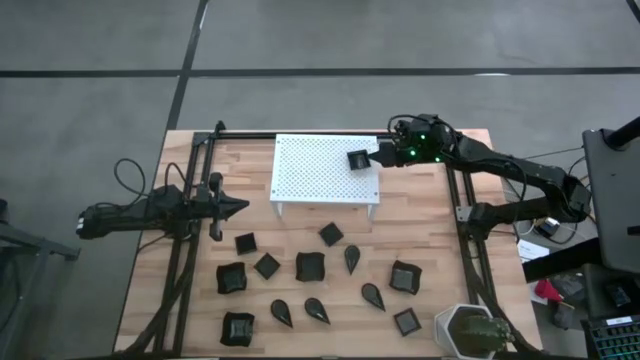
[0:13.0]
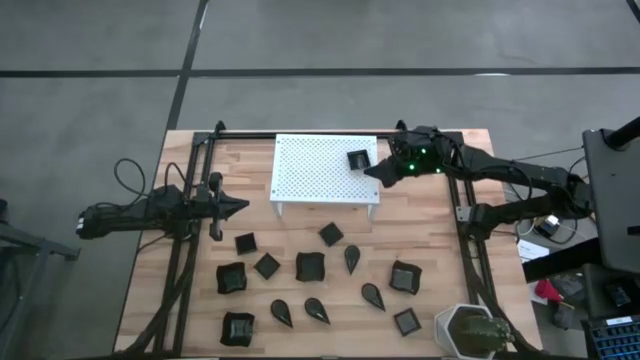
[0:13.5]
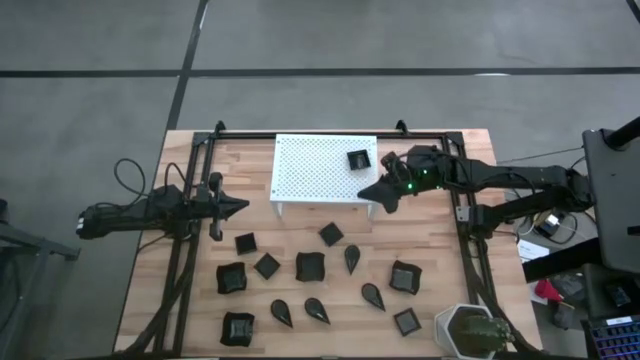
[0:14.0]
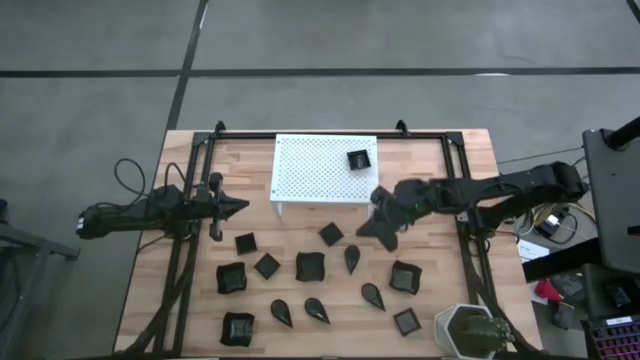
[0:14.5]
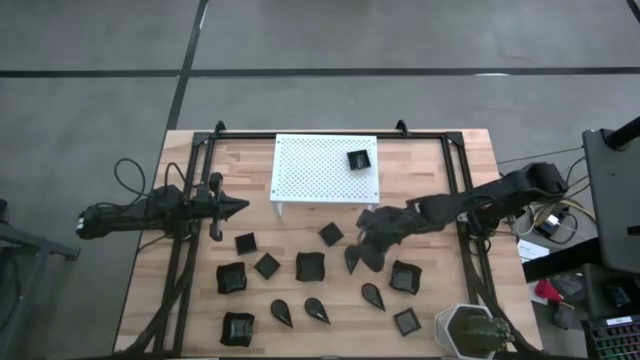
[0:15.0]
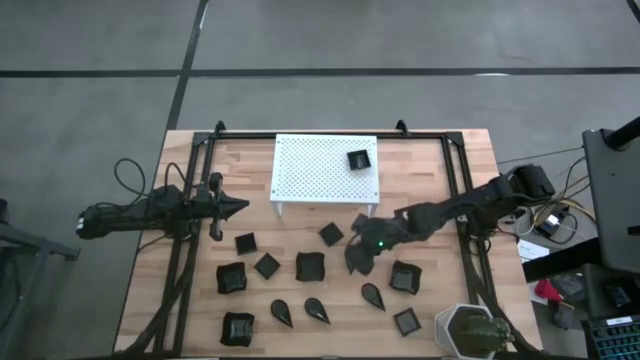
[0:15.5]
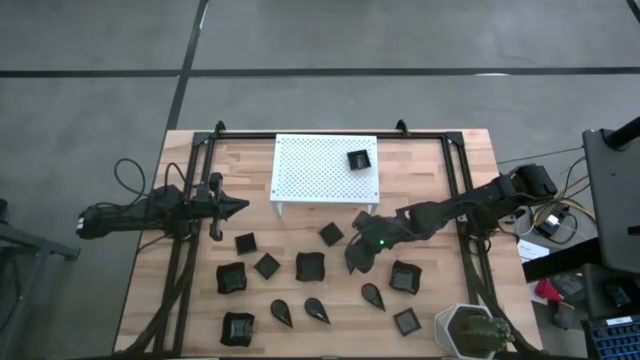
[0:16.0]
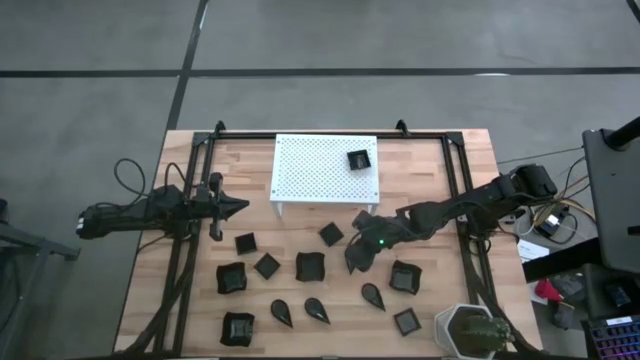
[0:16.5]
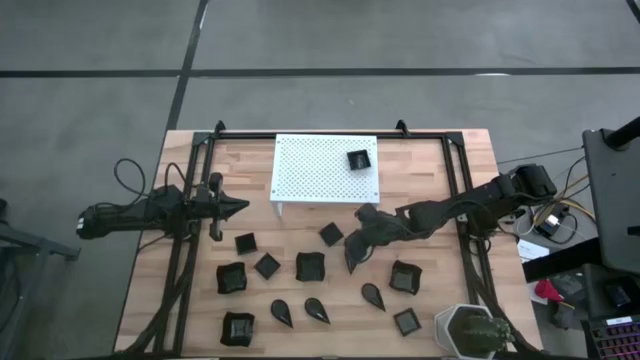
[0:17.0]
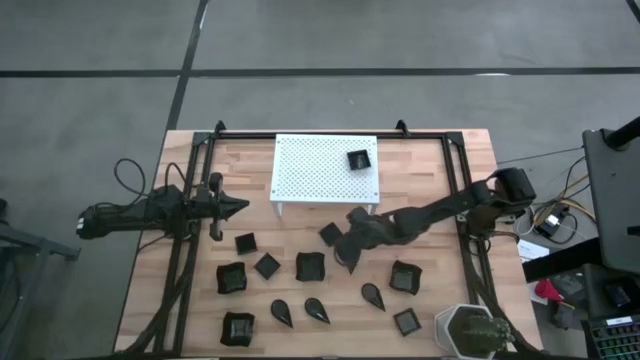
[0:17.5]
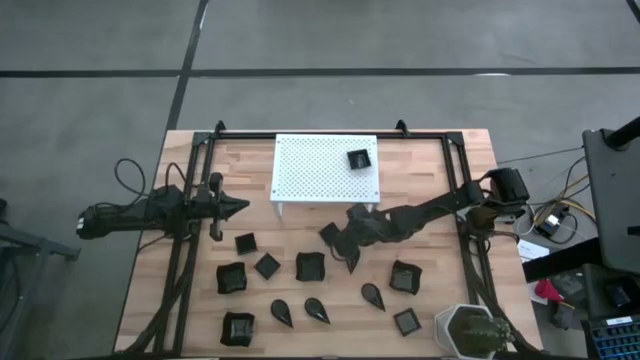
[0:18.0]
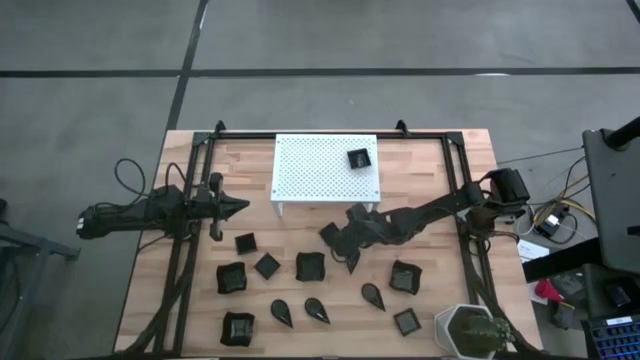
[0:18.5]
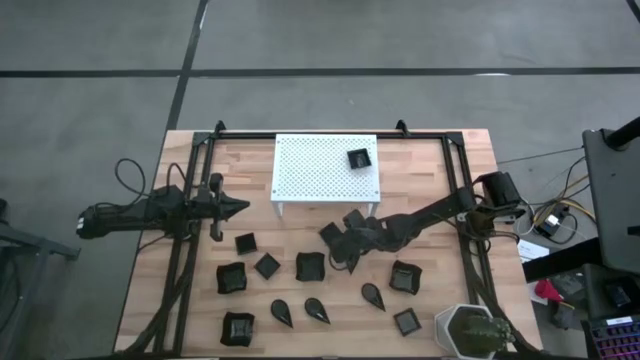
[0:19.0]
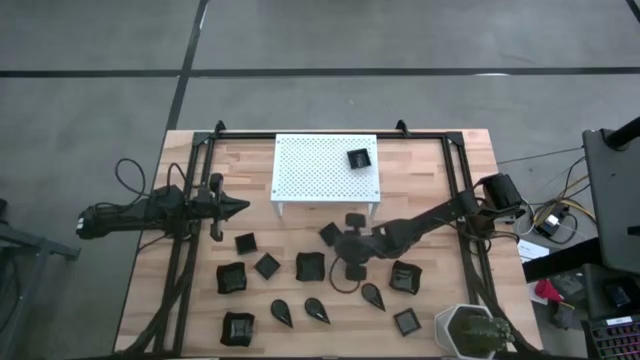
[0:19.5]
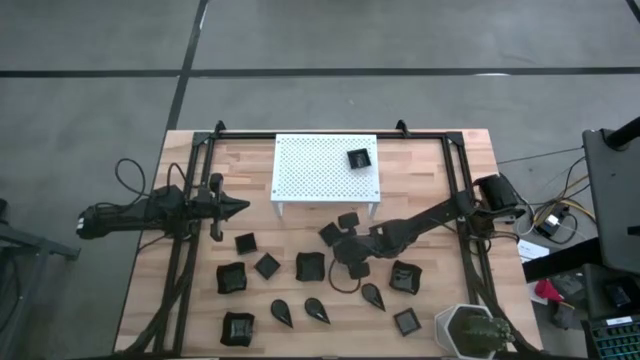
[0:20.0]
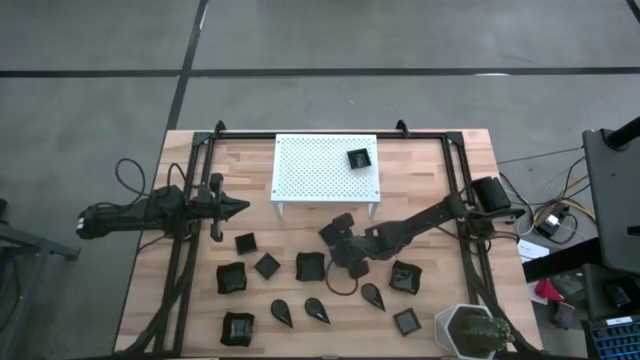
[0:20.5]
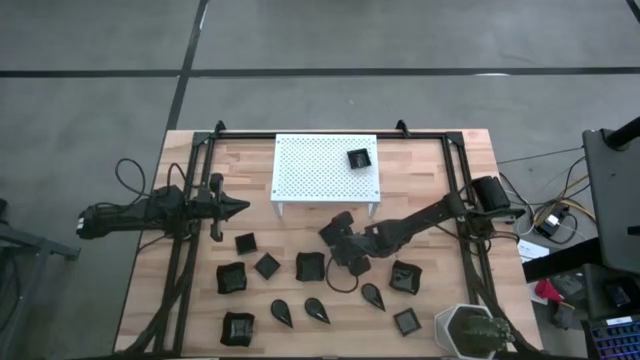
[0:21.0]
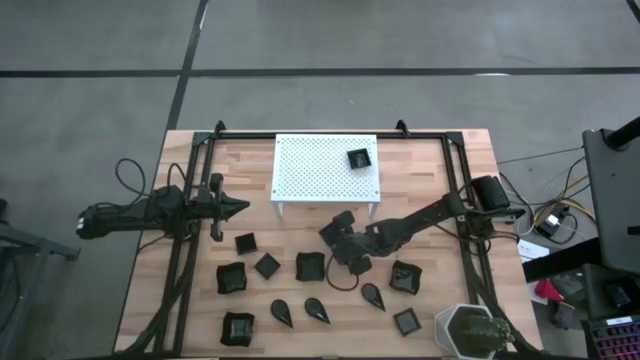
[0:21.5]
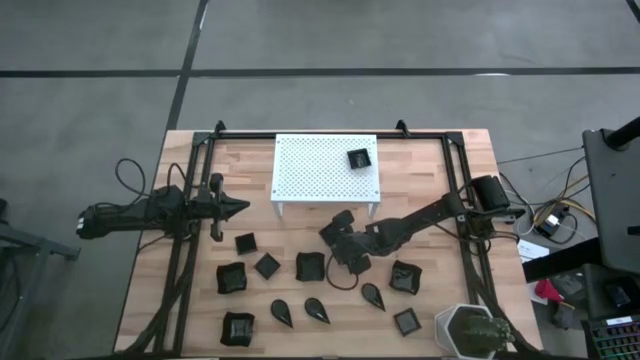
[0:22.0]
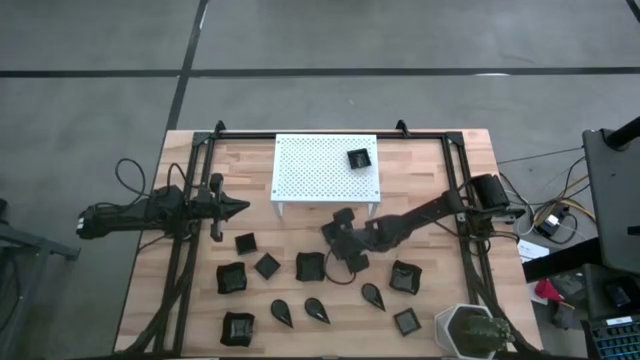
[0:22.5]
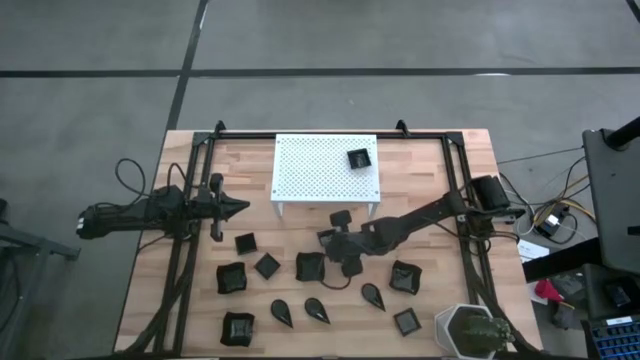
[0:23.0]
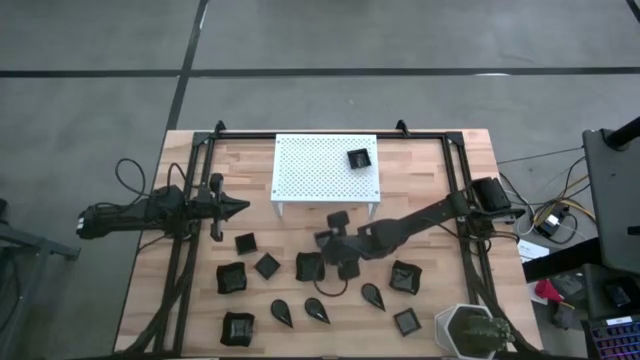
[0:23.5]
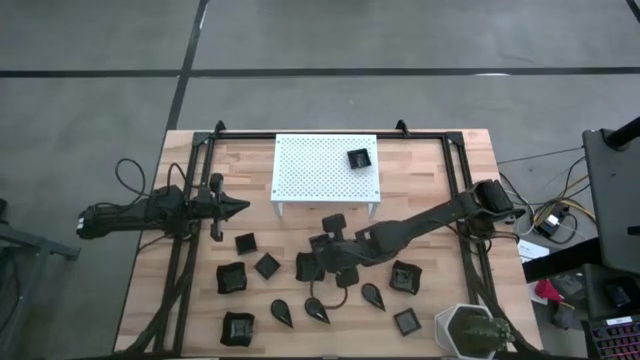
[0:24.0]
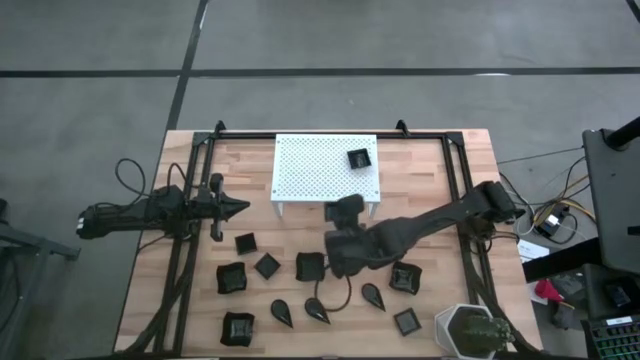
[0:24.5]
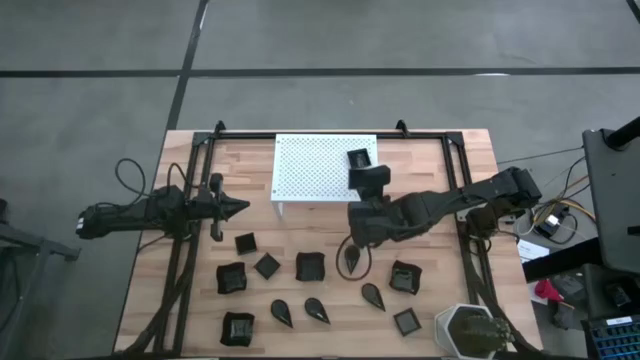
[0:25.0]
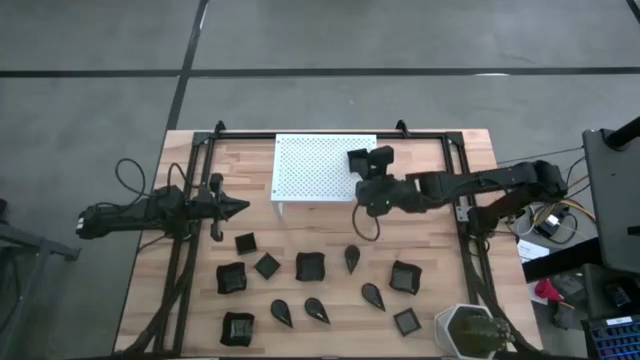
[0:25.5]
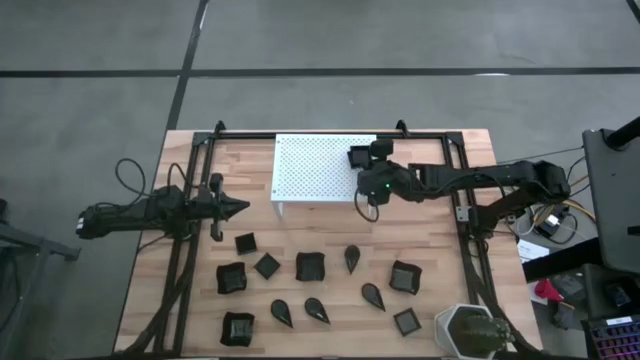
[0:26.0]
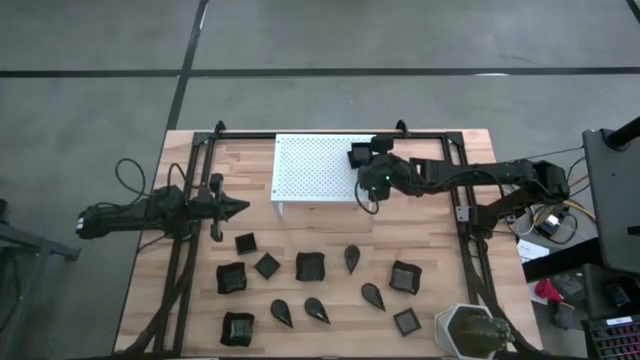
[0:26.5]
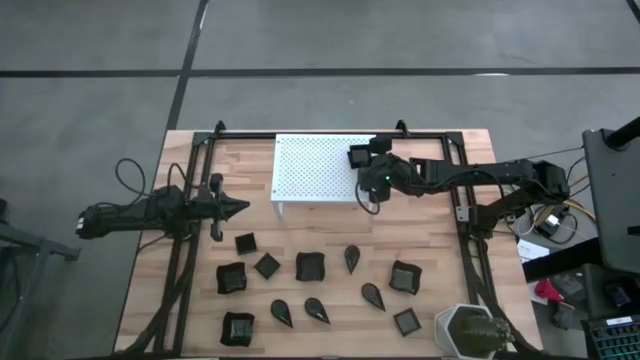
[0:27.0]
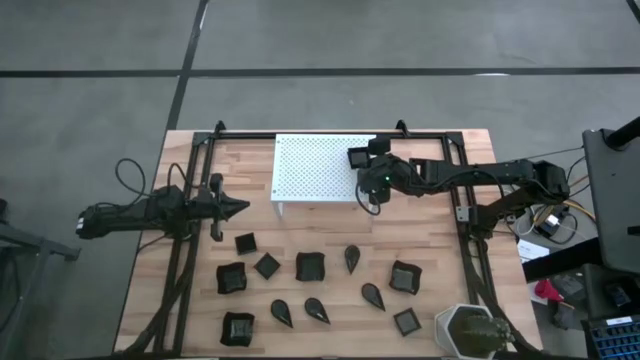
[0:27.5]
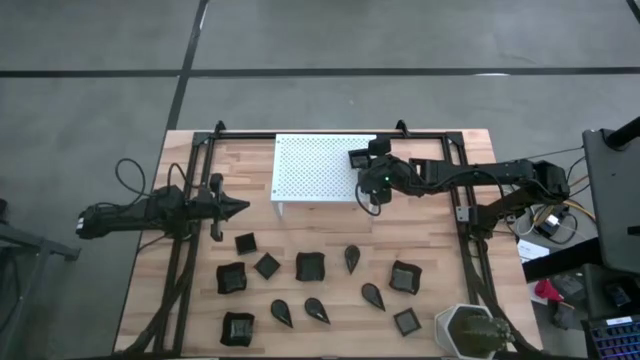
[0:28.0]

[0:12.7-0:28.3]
Task: Pick & Place Mini shaped plates
Stack the square plate on top of the square plate on the shelf

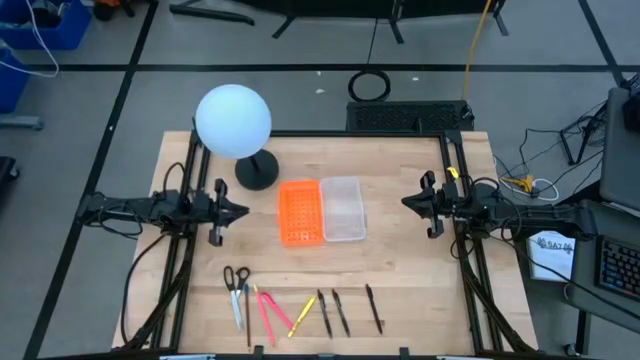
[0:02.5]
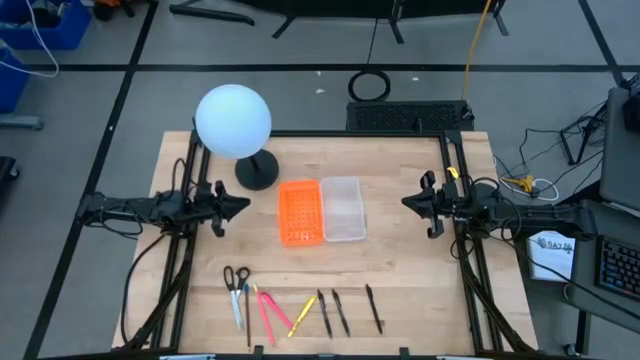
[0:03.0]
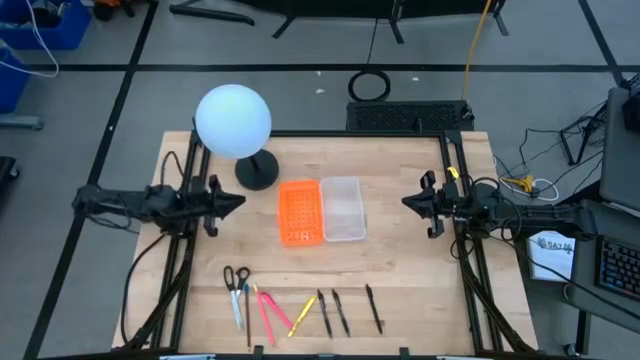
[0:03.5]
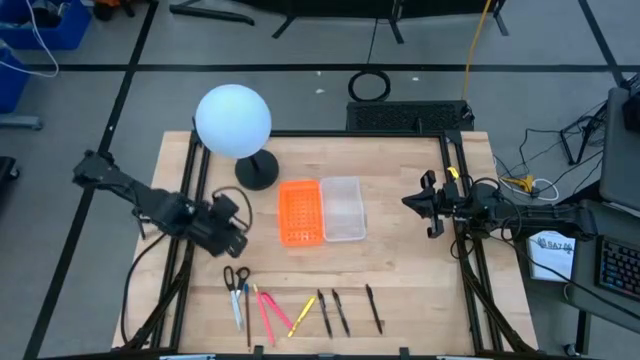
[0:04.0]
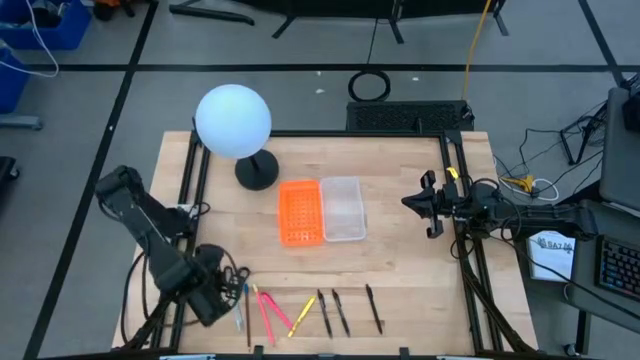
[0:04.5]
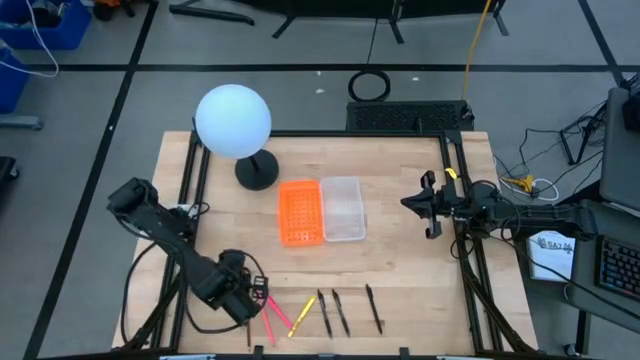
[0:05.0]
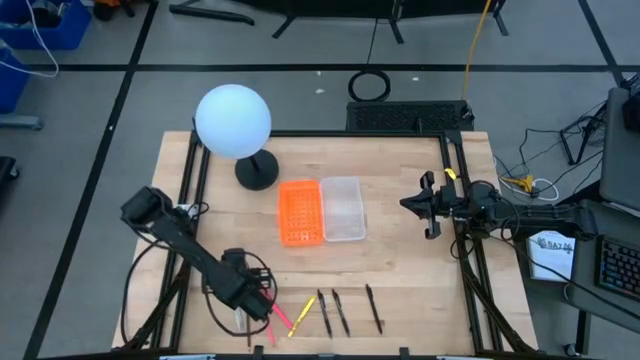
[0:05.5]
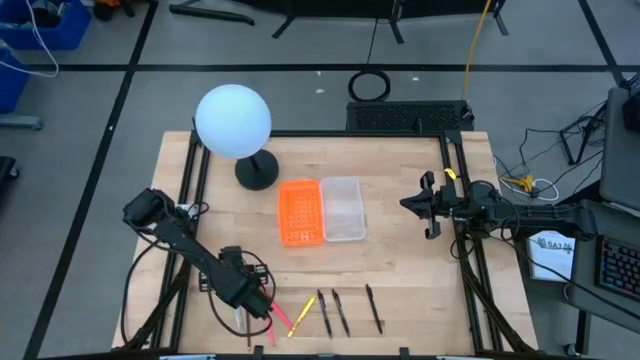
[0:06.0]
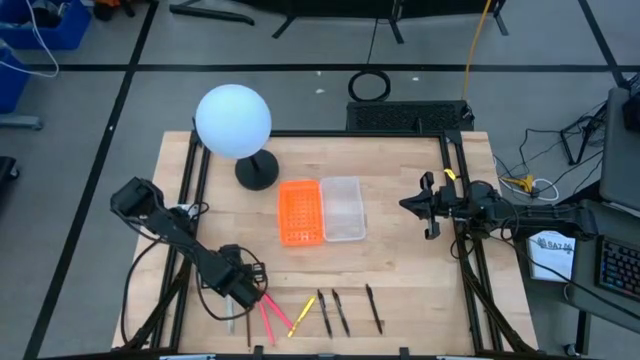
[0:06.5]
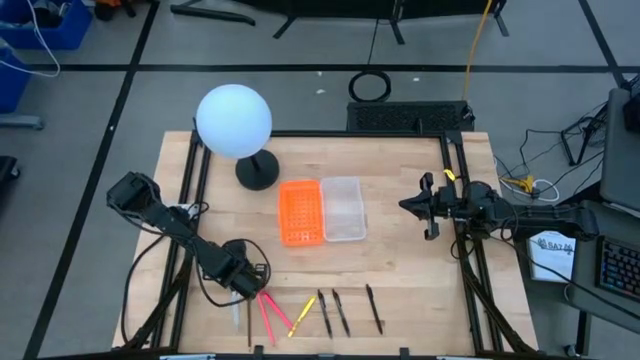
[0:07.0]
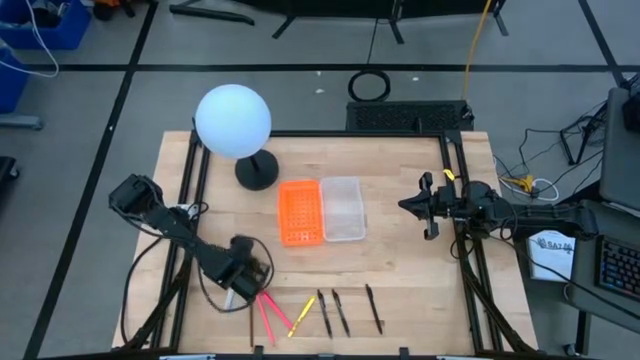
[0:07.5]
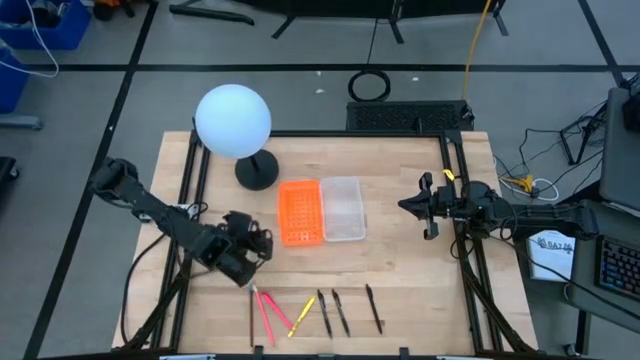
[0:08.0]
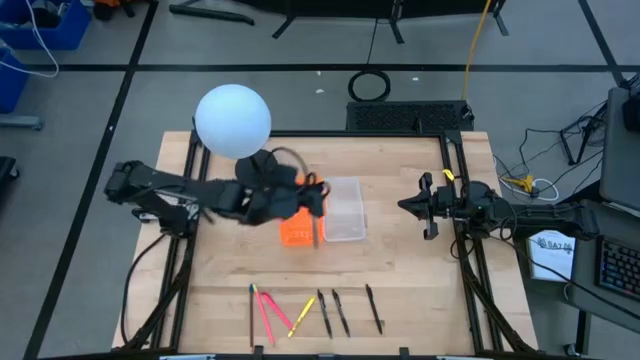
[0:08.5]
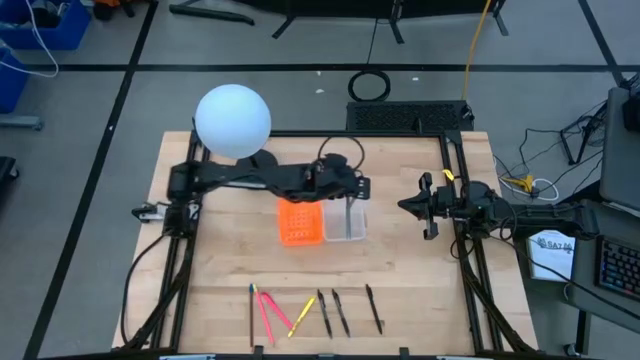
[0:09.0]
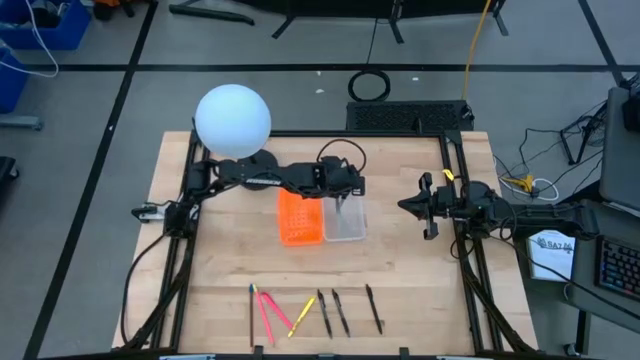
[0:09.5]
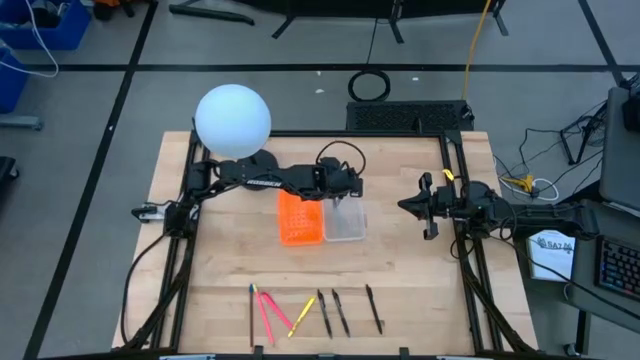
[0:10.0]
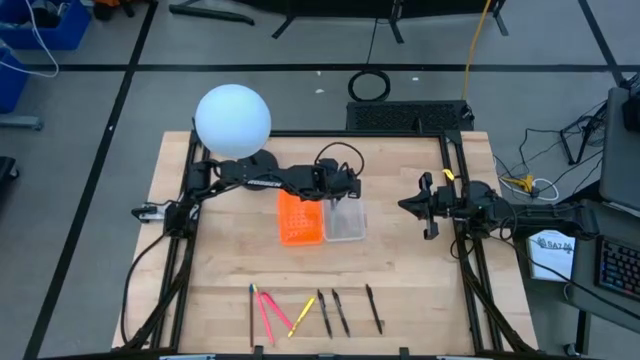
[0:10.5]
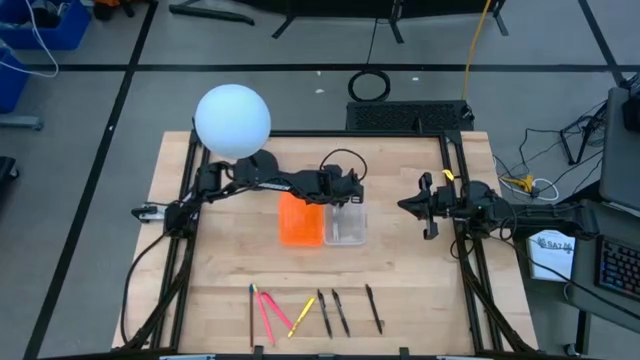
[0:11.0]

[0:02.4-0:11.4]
Task: Pick & place school supplies into a supply box
Put the black scissors into the orange supply box
